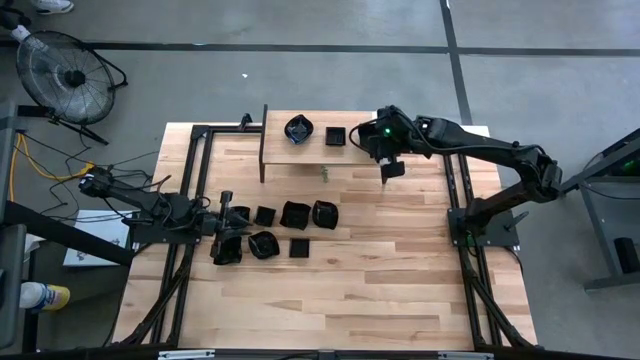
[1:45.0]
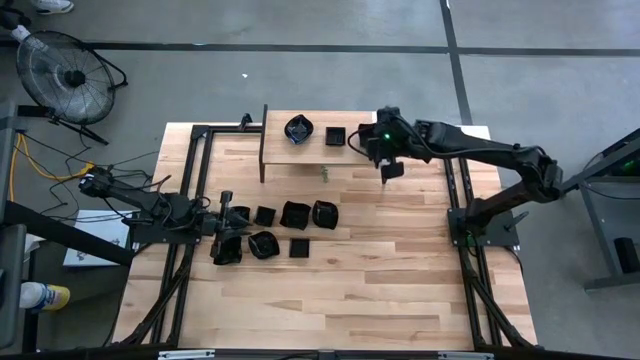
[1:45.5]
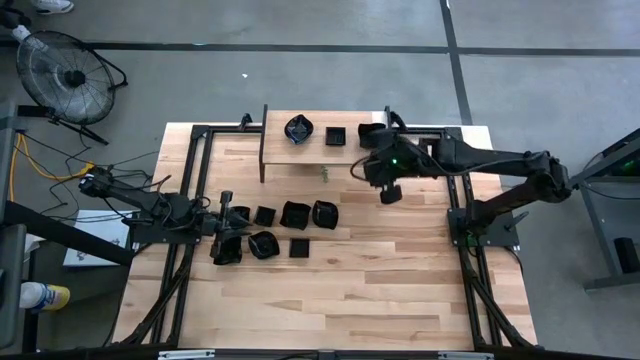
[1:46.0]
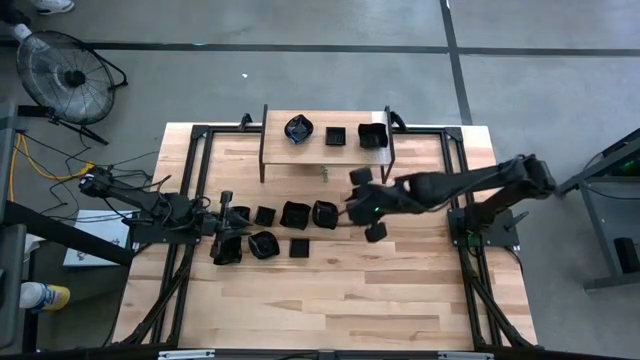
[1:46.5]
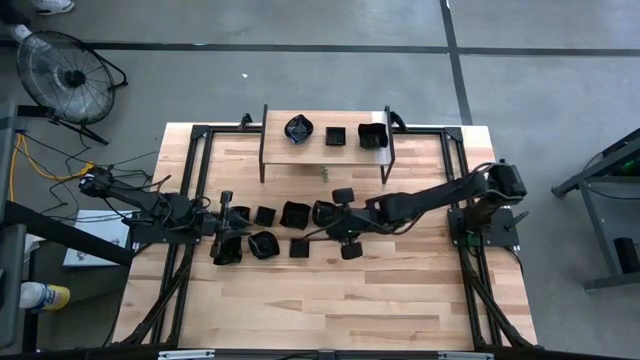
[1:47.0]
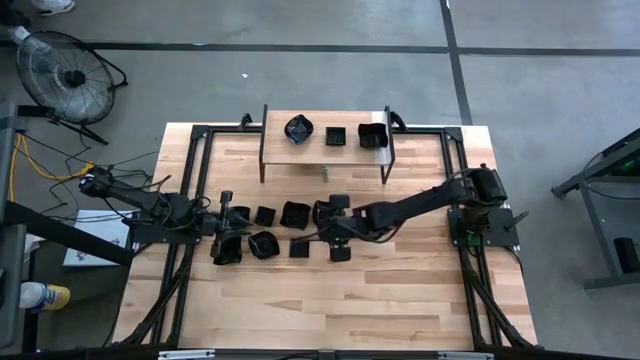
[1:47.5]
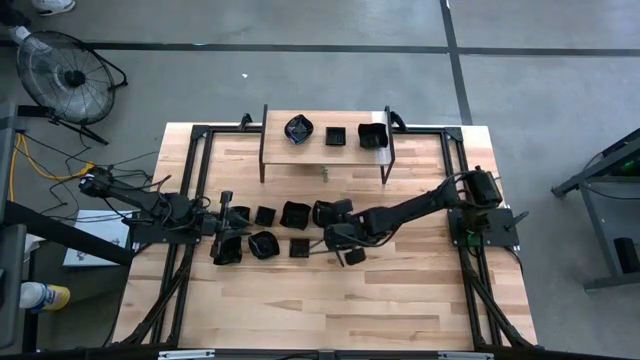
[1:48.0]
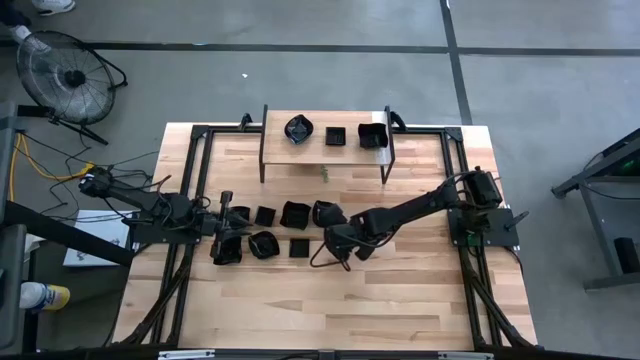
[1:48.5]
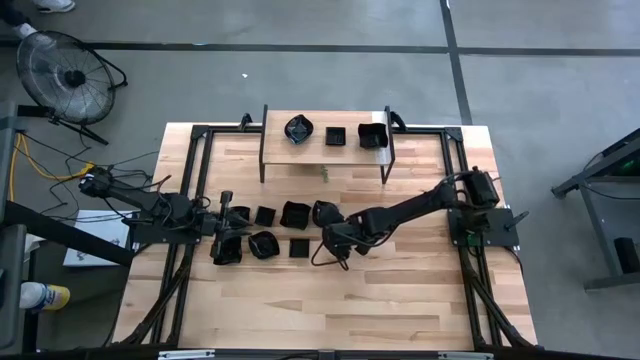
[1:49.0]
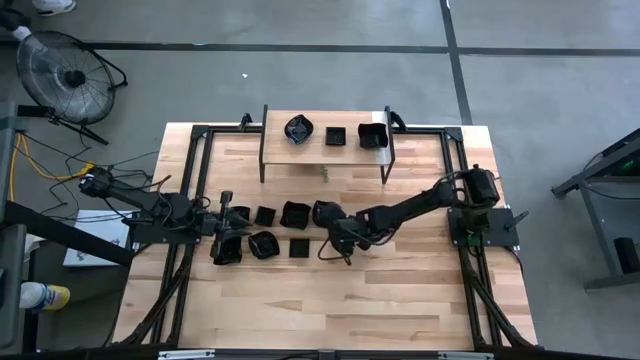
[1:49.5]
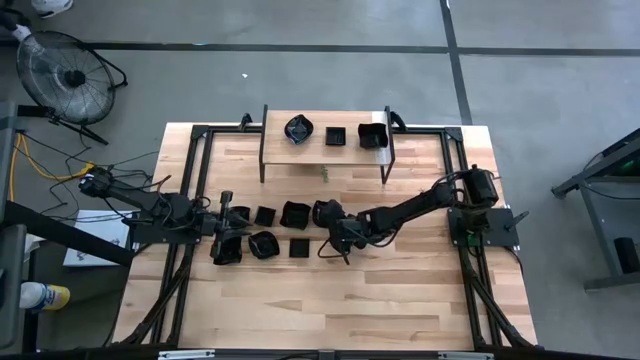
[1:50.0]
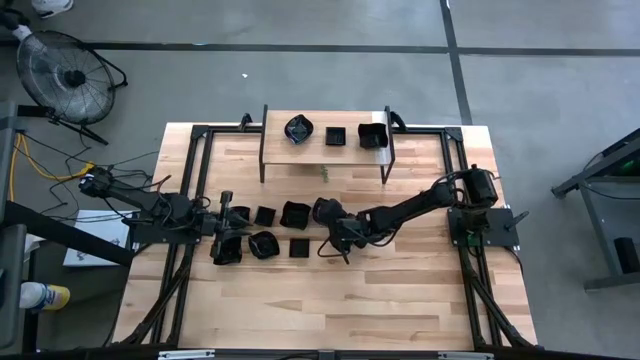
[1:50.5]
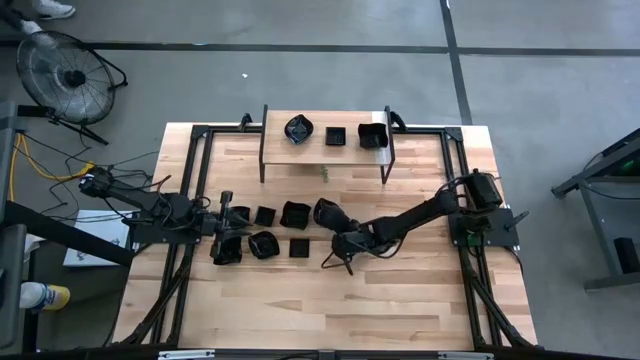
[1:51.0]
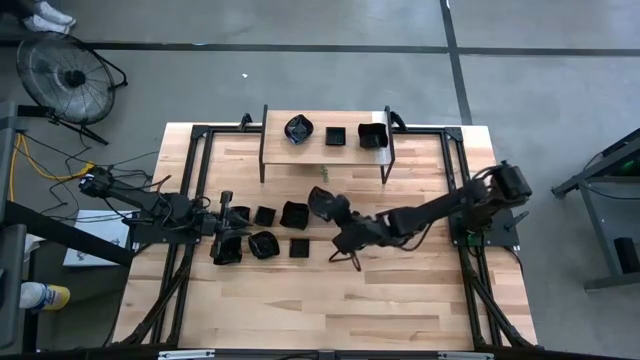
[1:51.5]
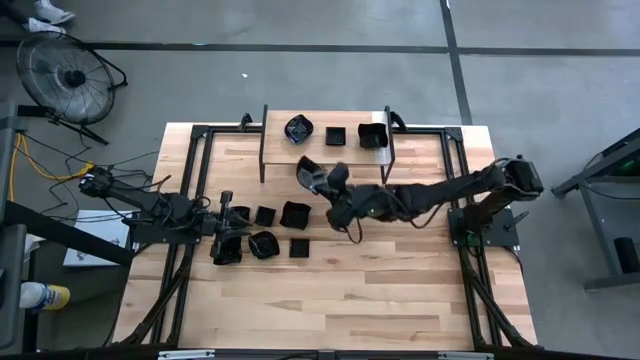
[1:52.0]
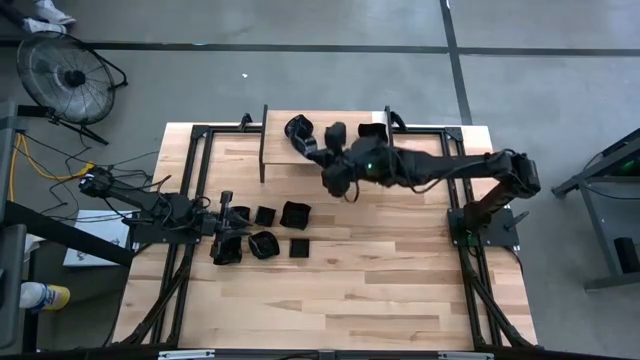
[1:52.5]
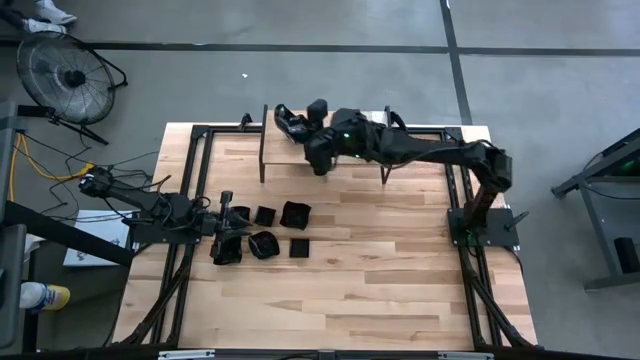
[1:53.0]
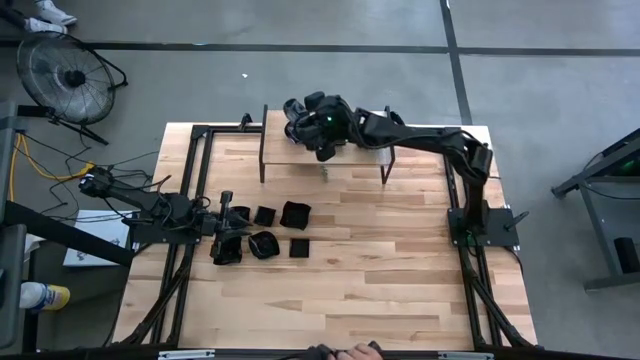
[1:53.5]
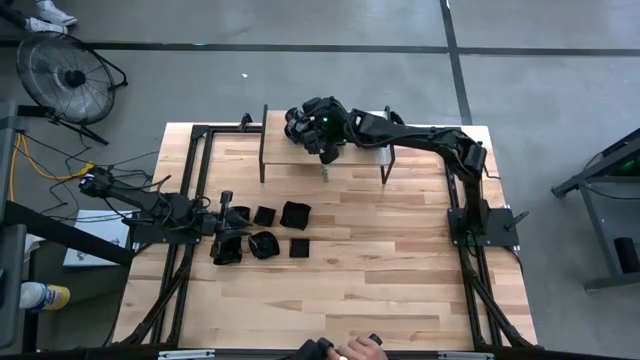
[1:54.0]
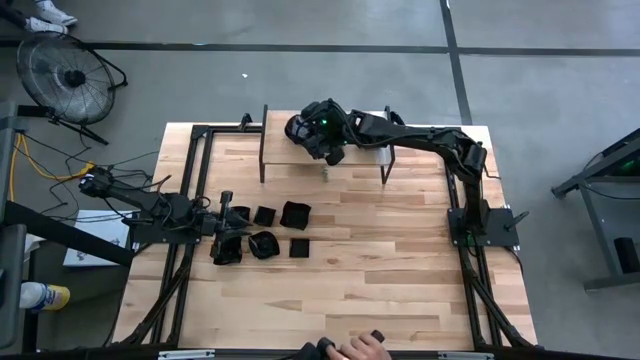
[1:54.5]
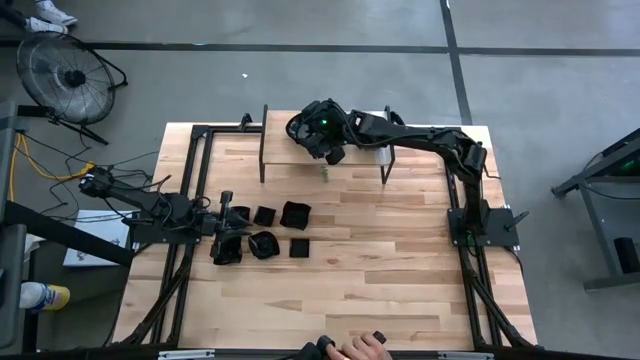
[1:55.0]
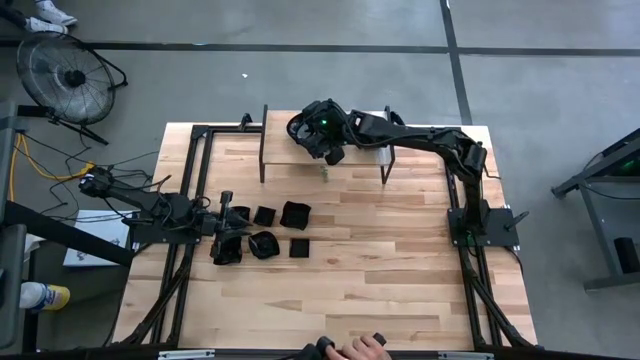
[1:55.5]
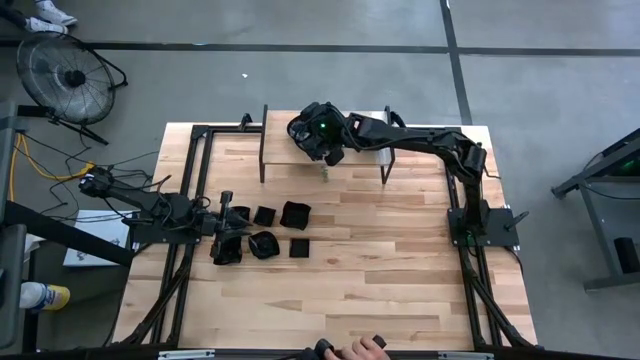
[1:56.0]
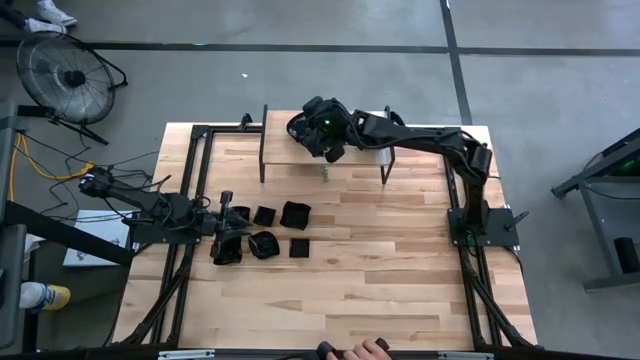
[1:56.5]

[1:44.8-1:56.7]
Task: Pick & Place Mini shaped plates
Stack the leaf shaped plate on top of the other leaf shaped plate on the shelf

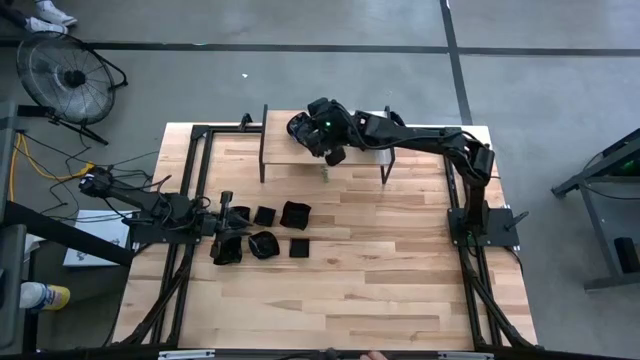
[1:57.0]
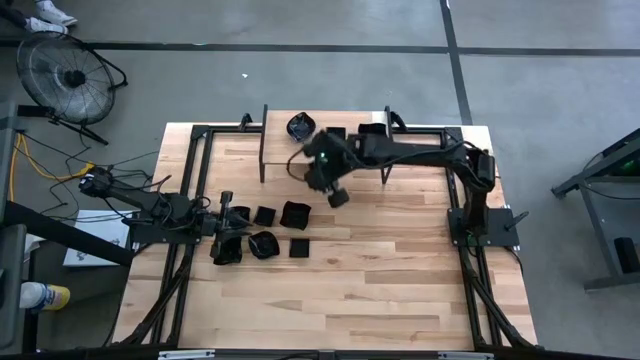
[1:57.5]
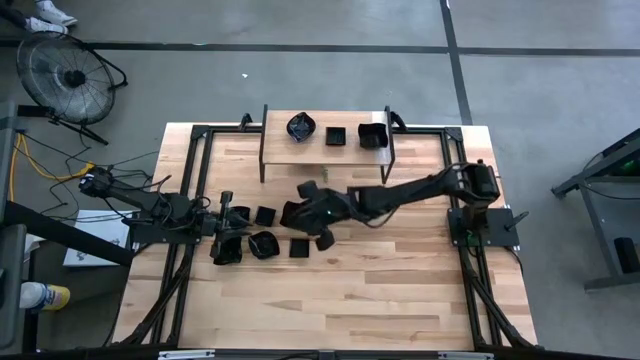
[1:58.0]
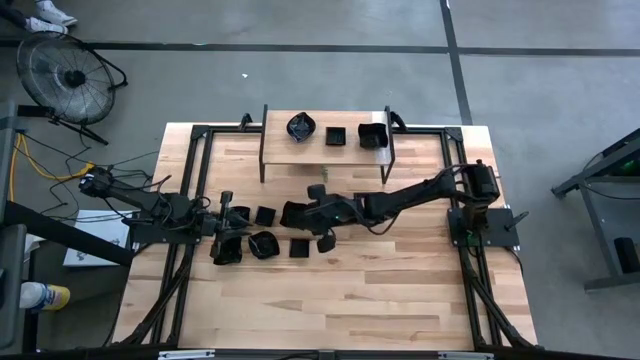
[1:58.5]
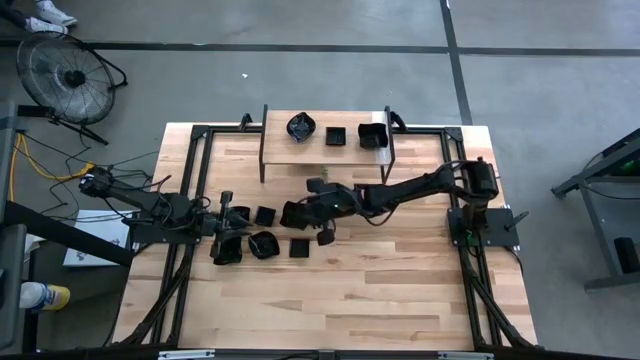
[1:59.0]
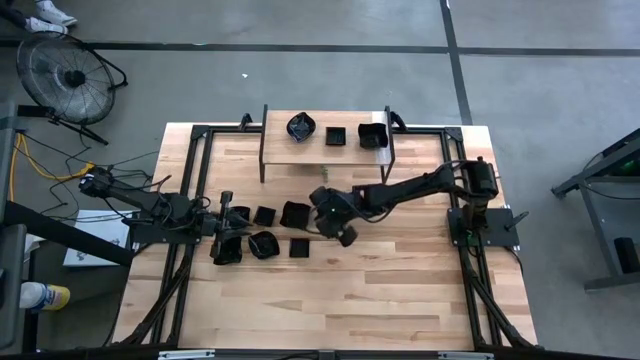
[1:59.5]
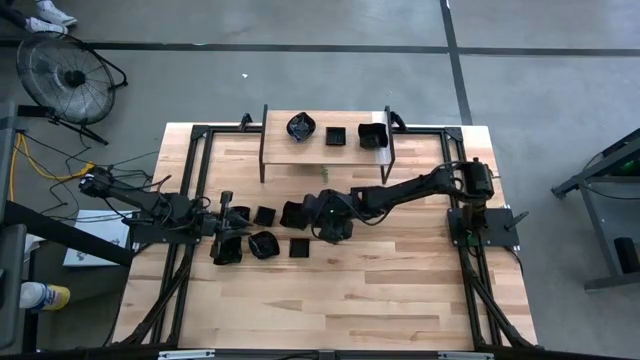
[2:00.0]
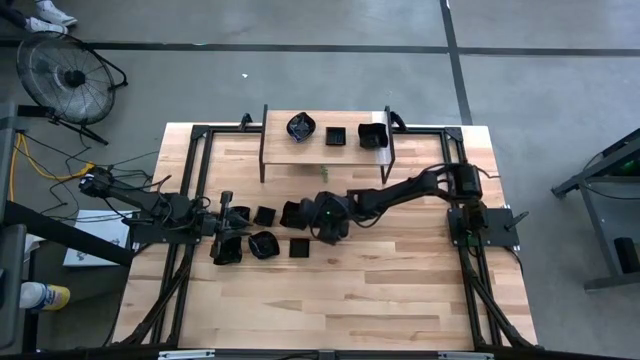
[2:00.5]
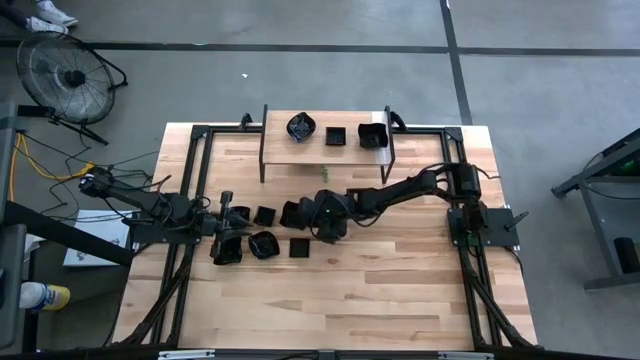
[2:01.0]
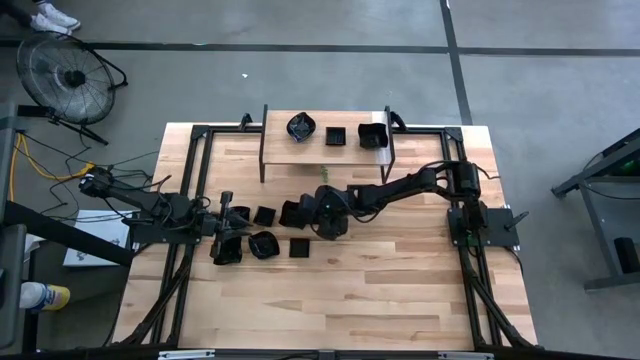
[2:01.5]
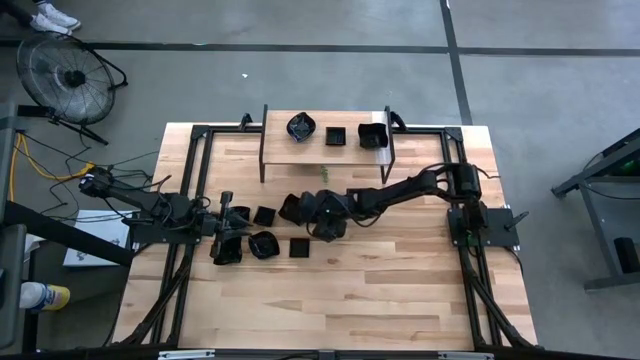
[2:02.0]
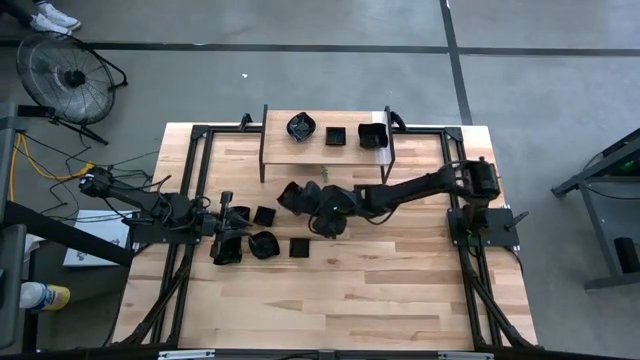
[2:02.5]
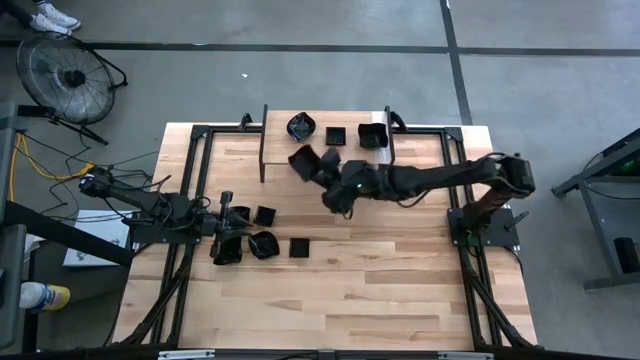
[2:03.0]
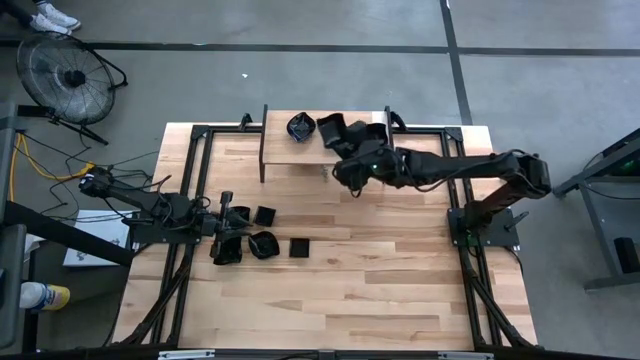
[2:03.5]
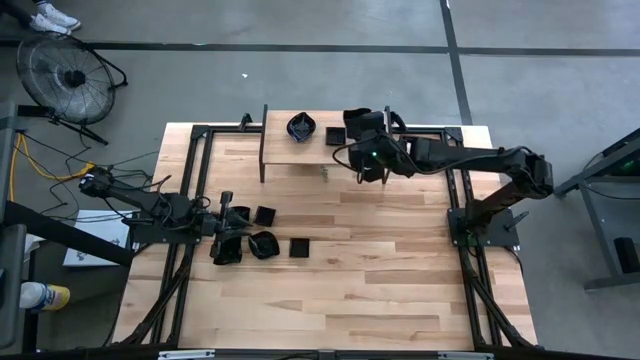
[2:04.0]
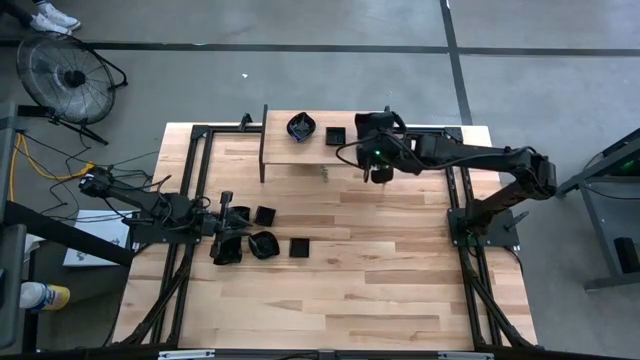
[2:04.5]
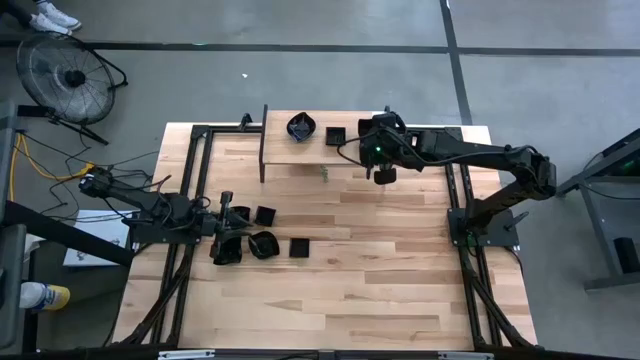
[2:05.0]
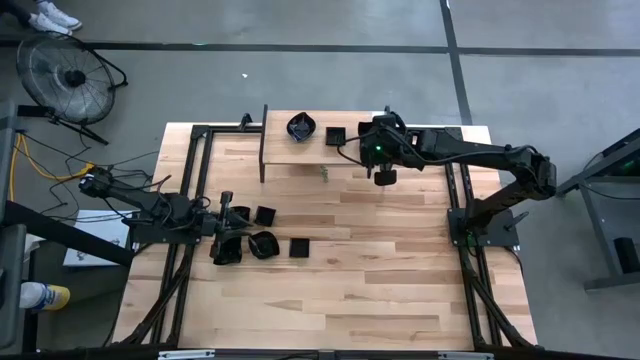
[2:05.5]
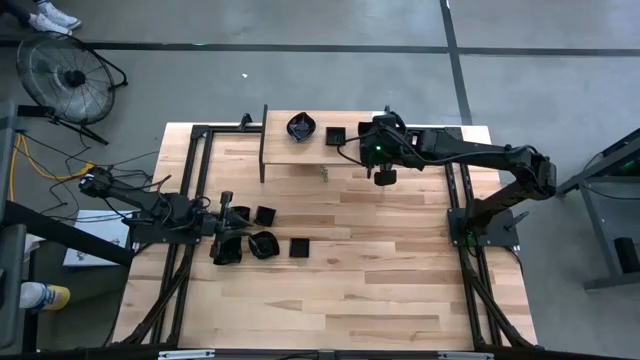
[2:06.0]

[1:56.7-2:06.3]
Stack the distorted square plate on top of the other distorted square plate on the shelf
